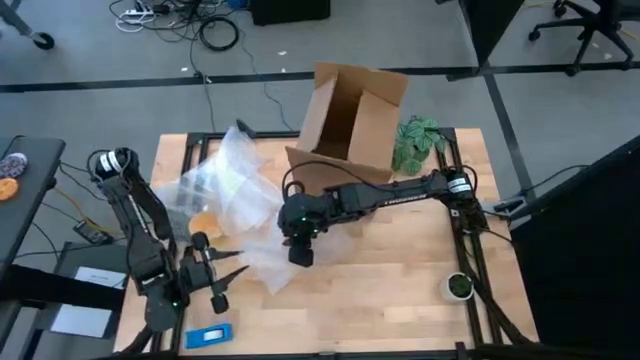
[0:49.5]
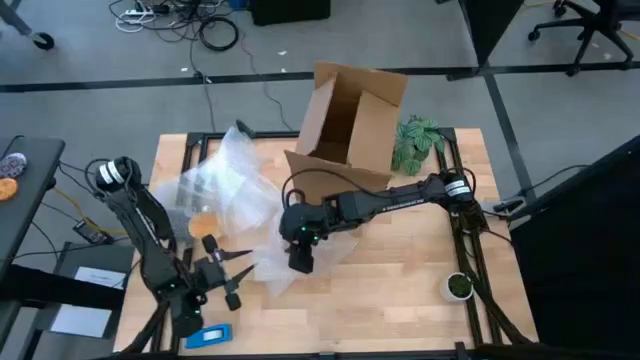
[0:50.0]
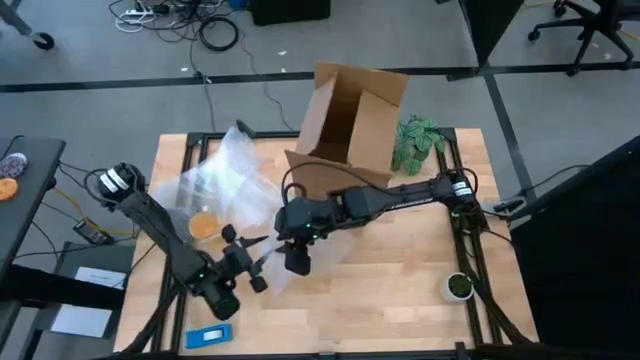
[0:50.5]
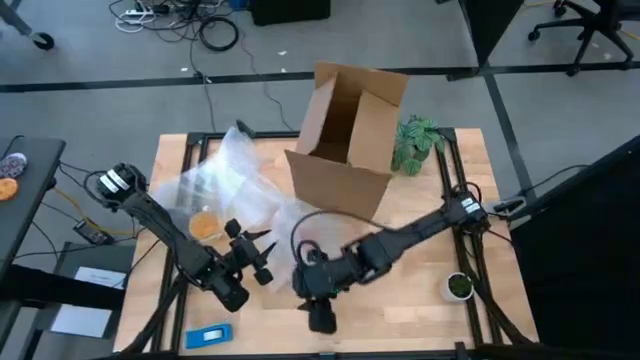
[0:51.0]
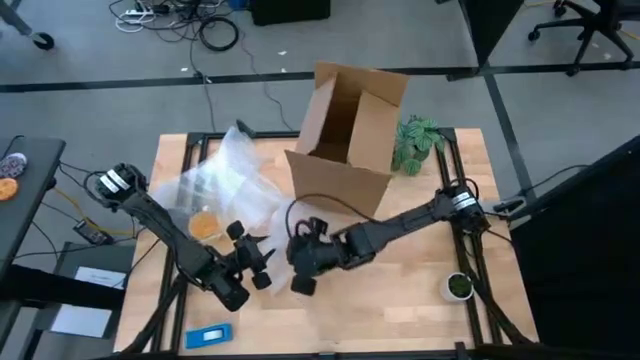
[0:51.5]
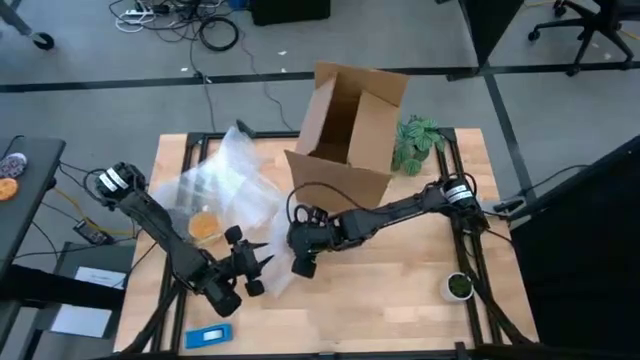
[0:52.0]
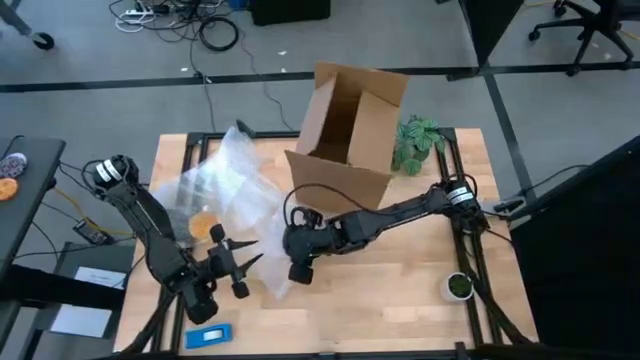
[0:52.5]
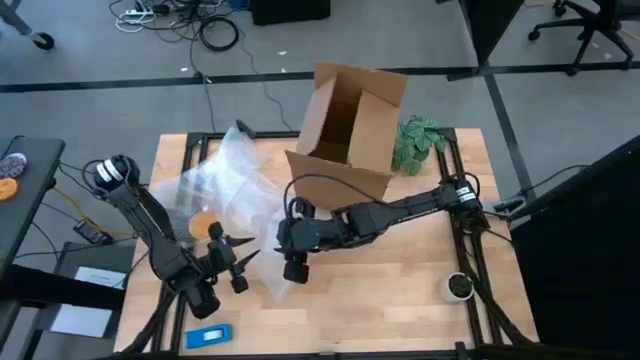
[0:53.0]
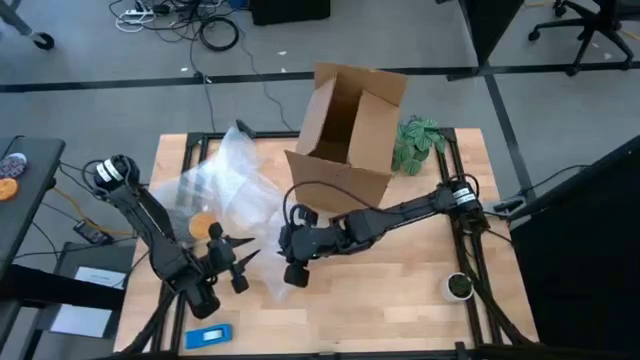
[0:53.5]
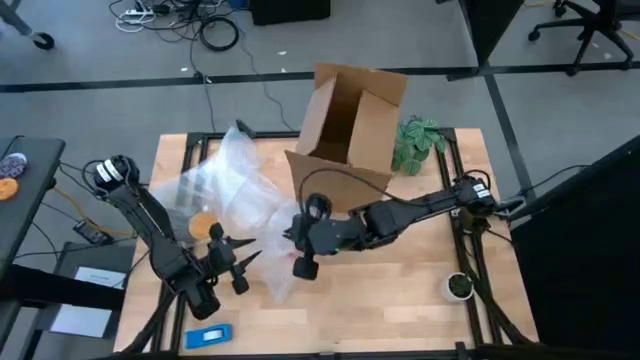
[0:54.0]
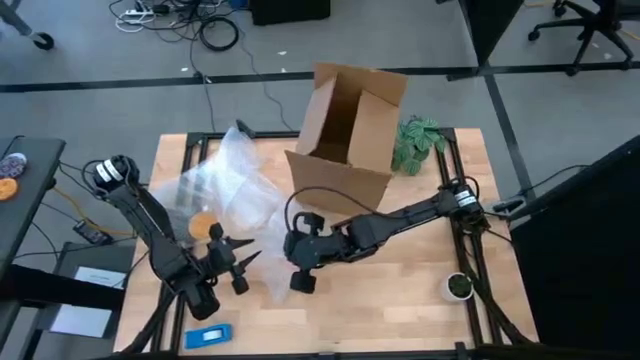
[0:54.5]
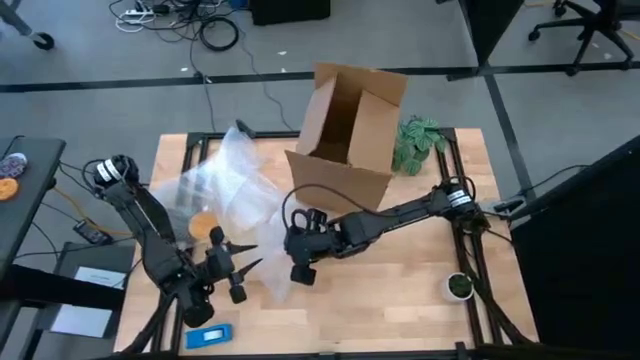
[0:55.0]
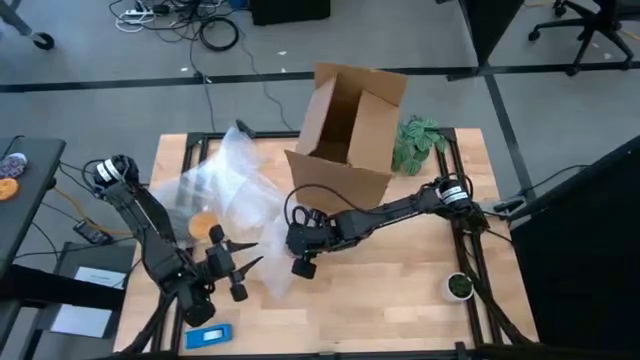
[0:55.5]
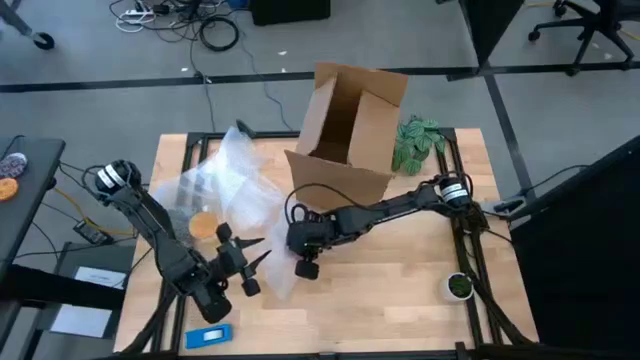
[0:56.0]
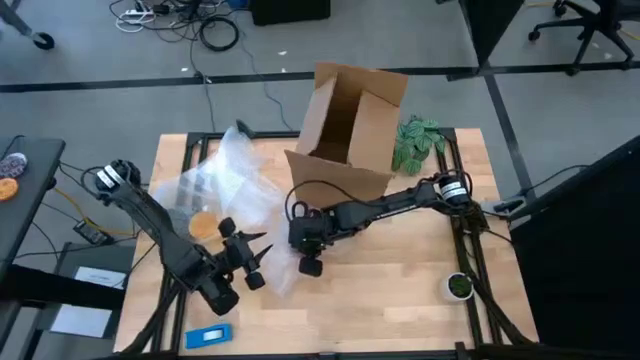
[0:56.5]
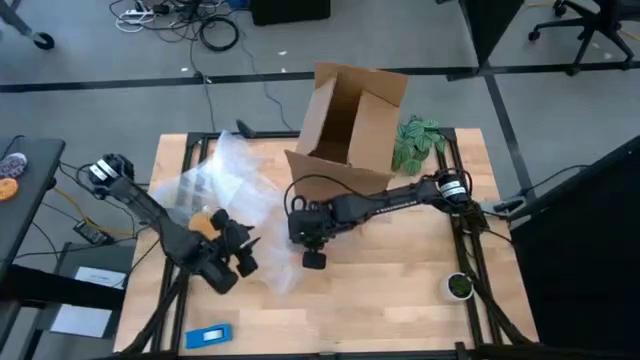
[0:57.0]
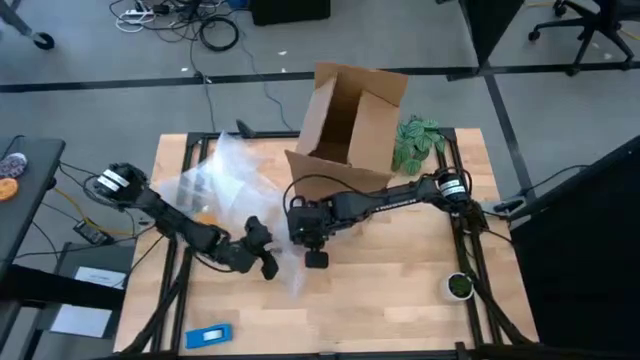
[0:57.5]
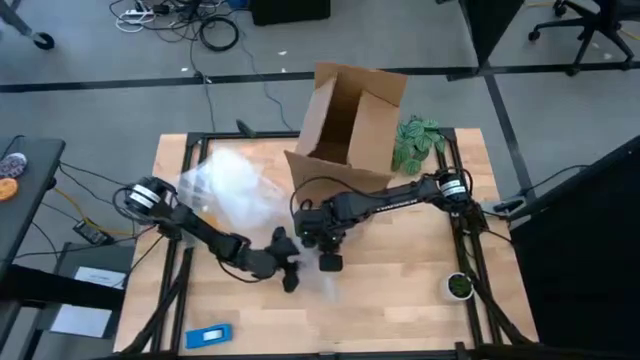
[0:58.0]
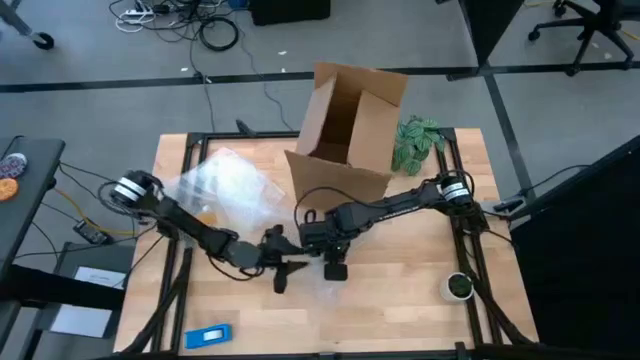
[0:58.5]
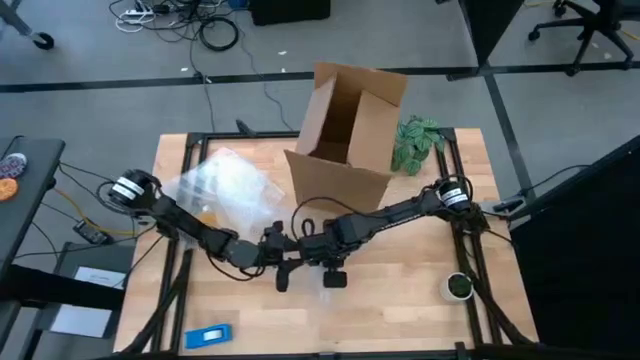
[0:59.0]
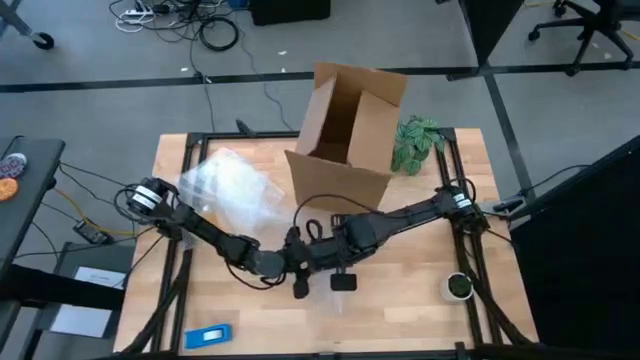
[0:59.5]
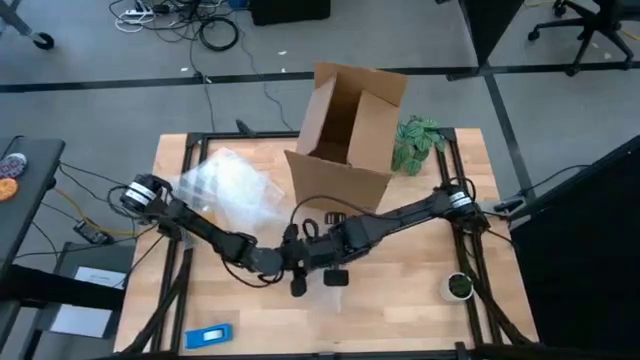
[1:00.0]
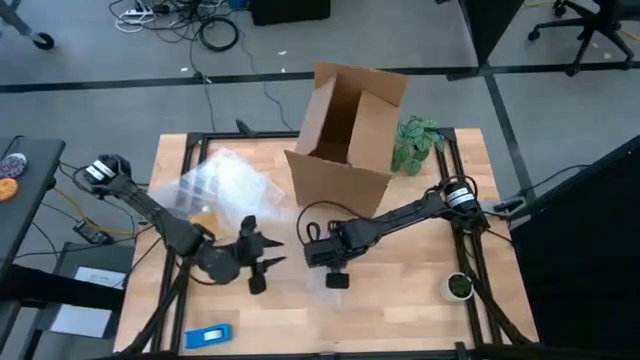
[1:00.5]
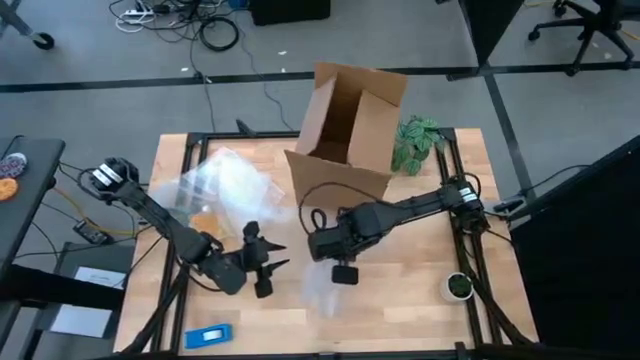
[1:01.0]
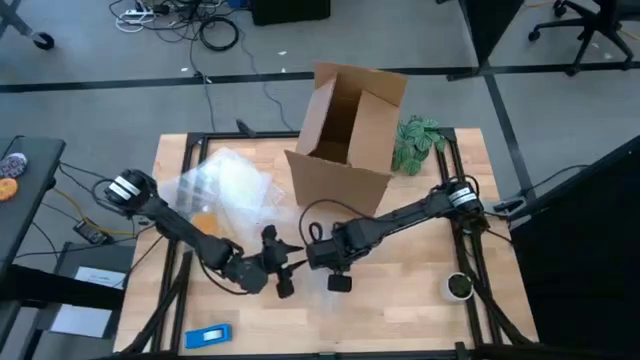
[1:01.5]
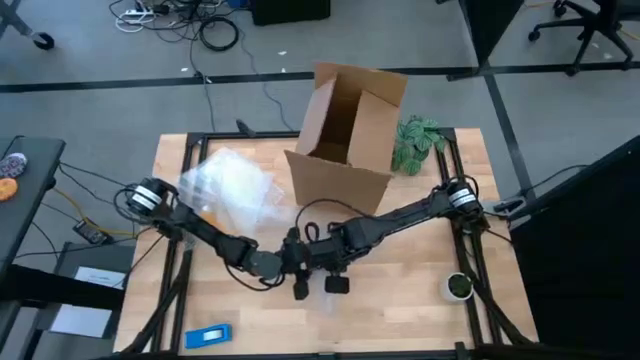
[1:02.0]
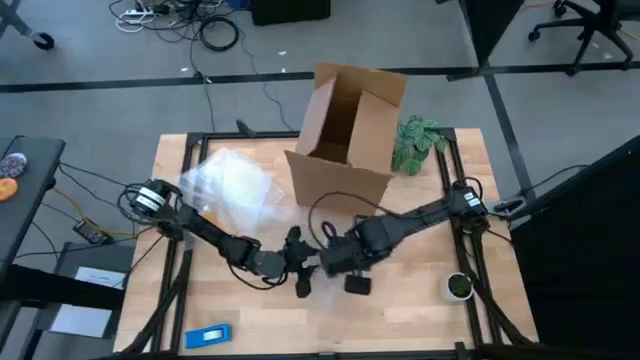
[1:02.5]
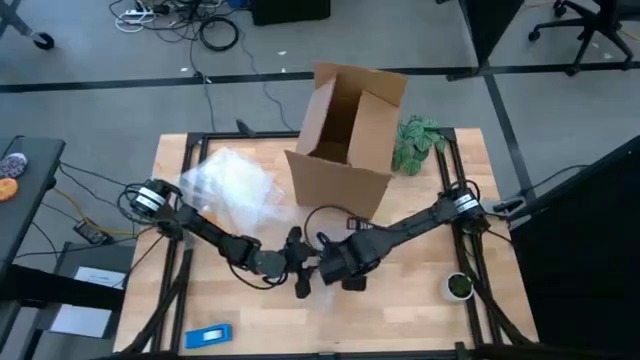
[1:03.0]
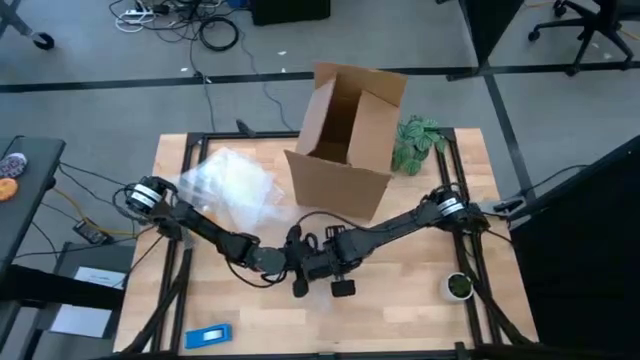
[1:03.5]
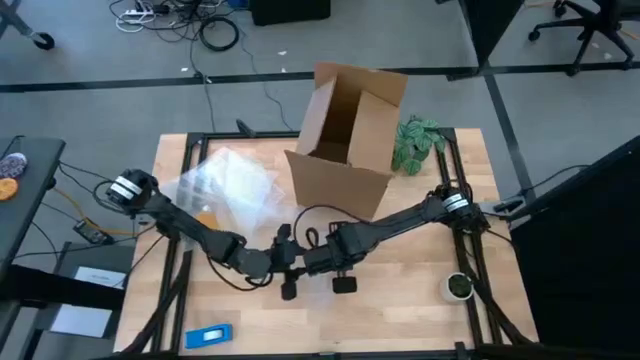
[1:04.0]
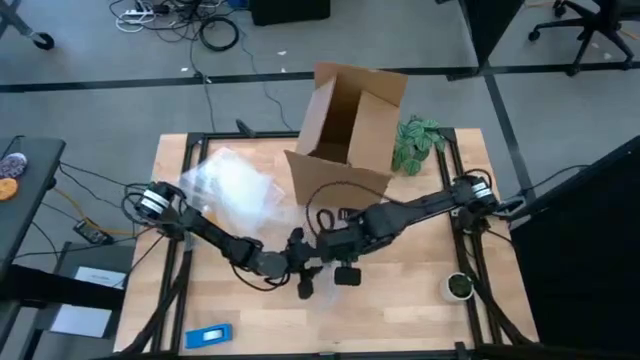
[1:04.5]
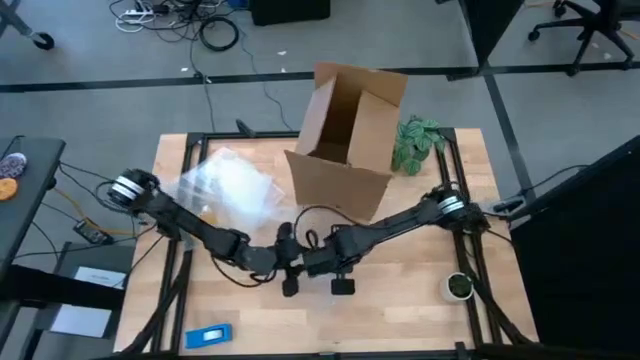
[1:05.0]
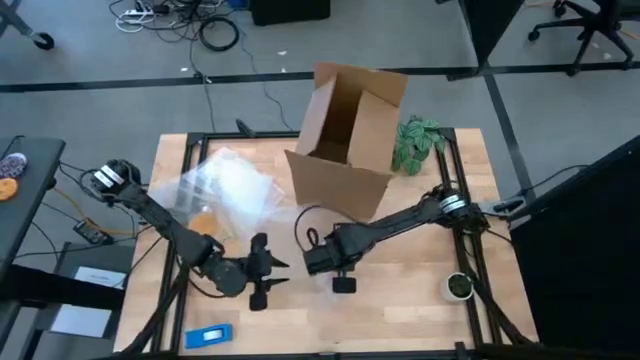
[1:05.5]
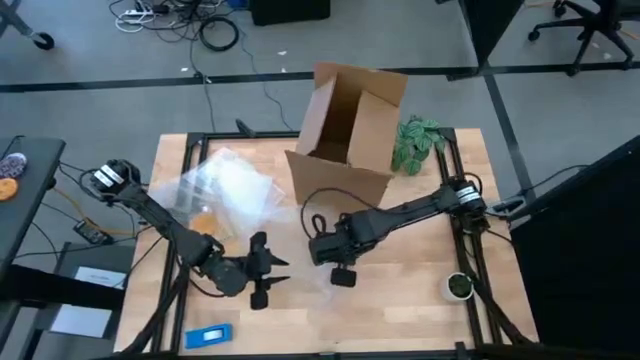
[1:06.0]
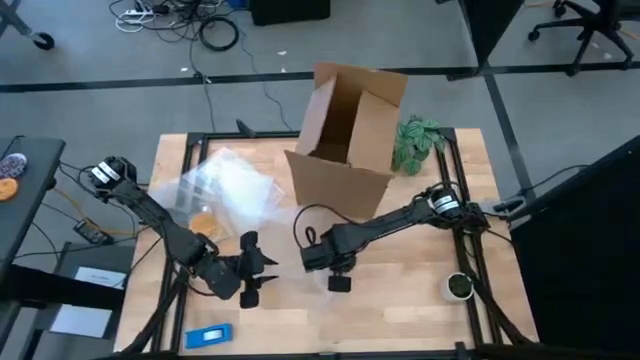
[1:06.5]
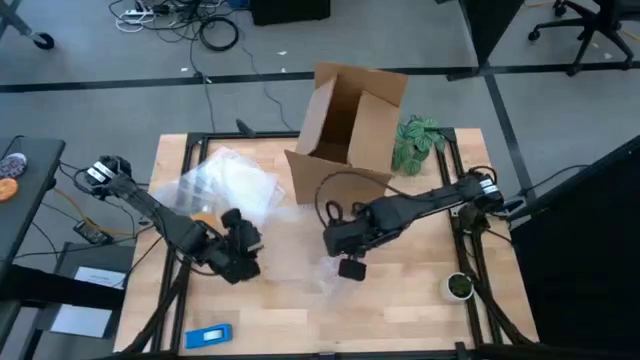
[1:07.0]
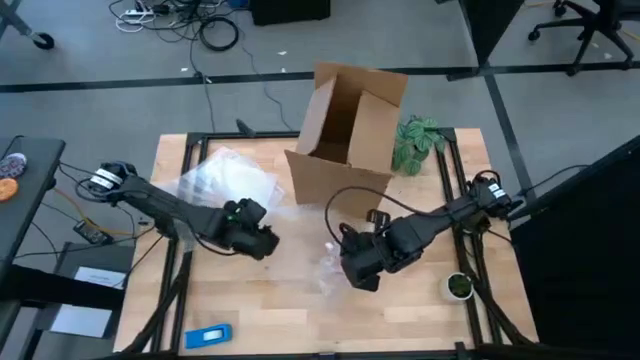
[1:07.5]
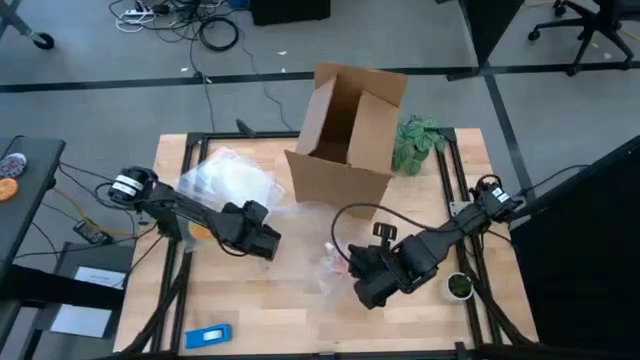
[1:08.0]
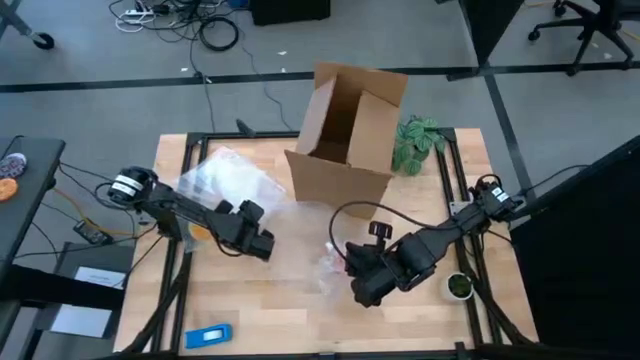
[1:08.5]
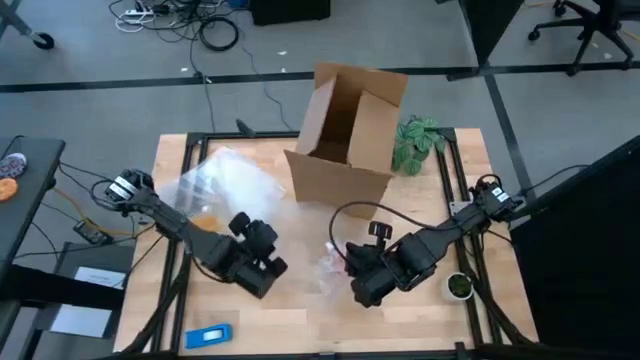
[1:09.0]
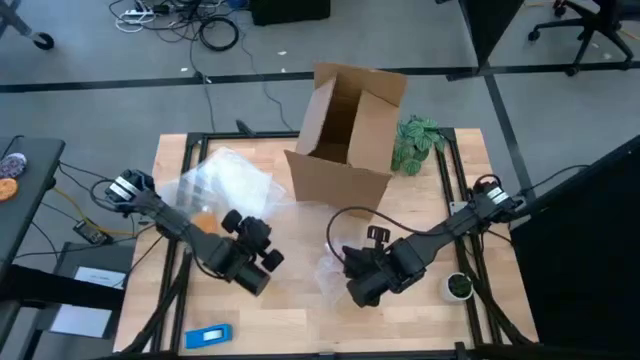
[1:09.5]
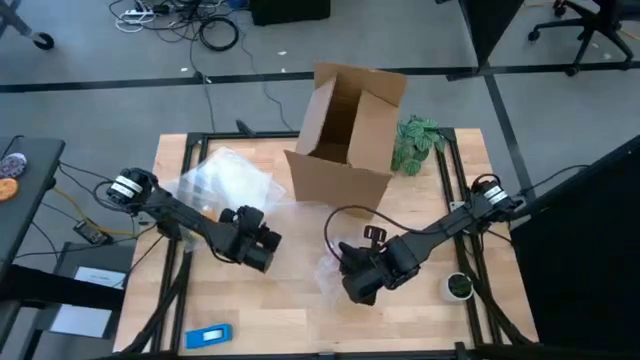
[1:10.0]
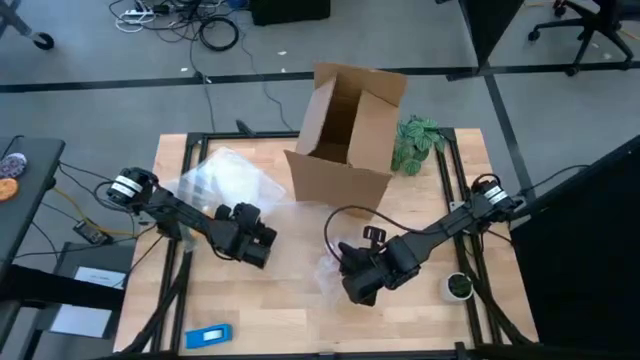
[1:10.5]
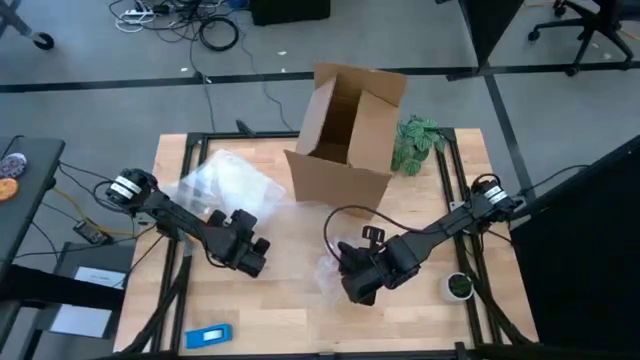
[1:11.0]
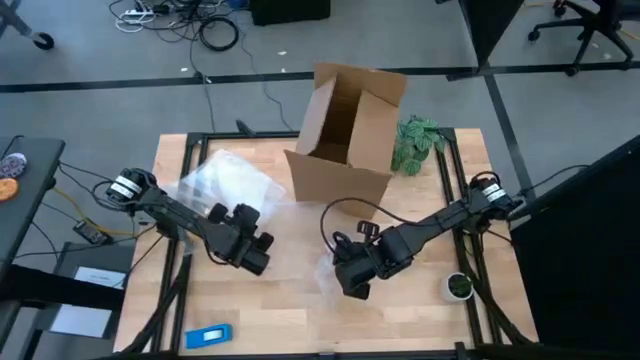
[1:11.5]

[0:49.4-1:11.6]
Task: wrap mug
Wrap the orange mug with transparent bubble wrap
